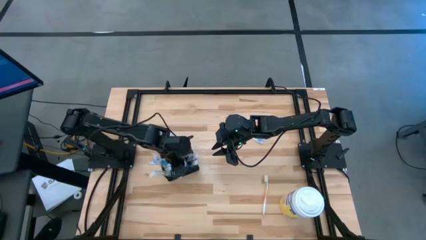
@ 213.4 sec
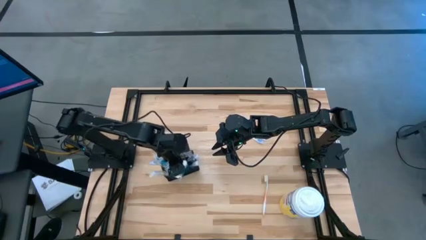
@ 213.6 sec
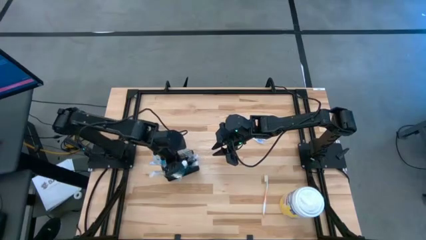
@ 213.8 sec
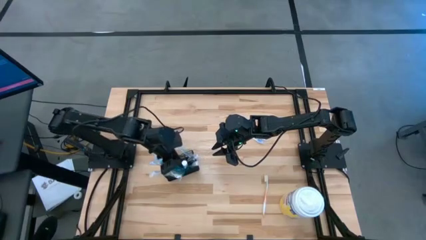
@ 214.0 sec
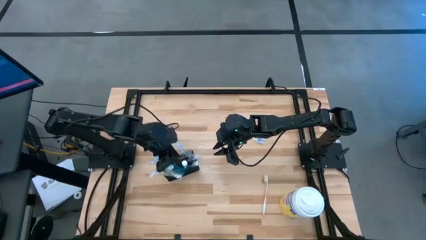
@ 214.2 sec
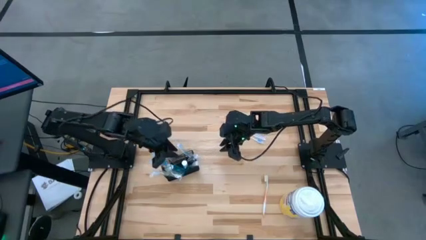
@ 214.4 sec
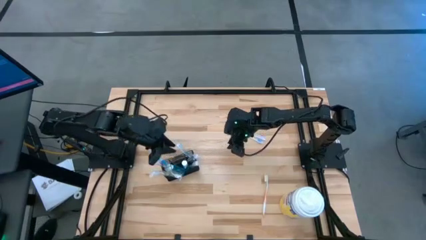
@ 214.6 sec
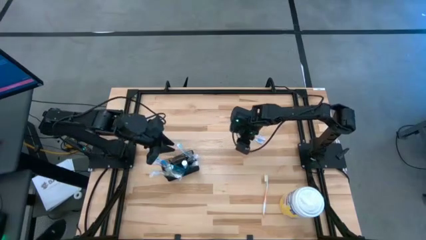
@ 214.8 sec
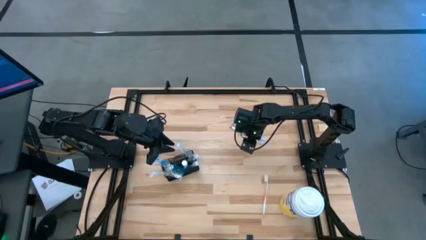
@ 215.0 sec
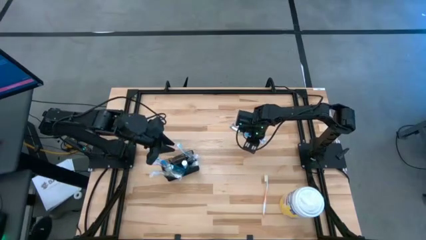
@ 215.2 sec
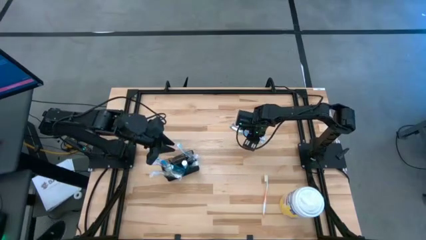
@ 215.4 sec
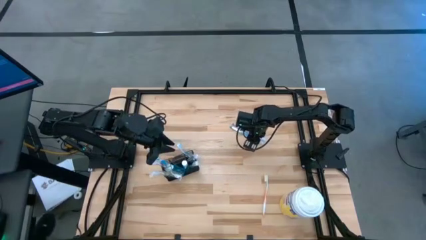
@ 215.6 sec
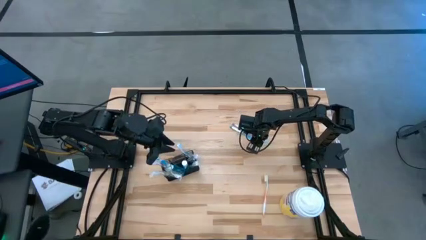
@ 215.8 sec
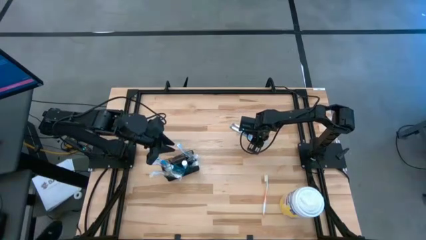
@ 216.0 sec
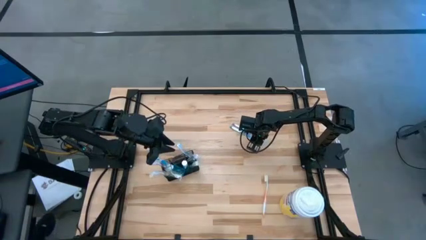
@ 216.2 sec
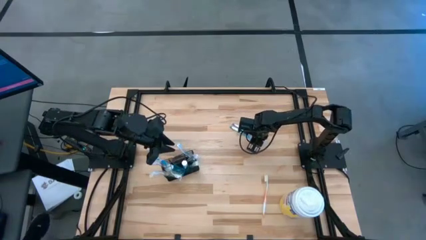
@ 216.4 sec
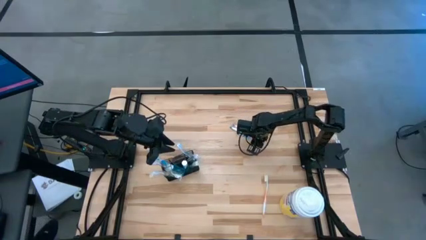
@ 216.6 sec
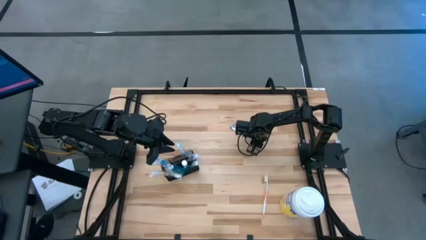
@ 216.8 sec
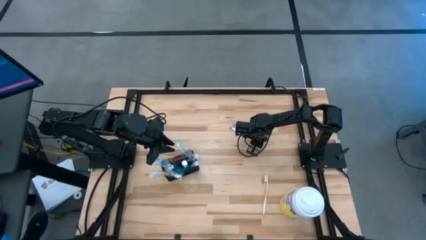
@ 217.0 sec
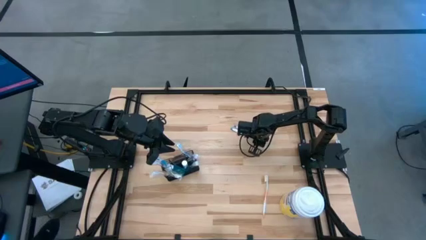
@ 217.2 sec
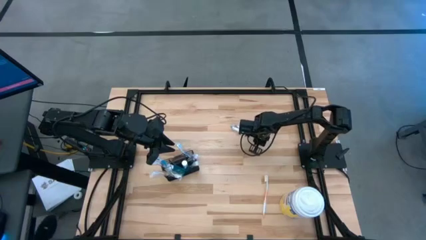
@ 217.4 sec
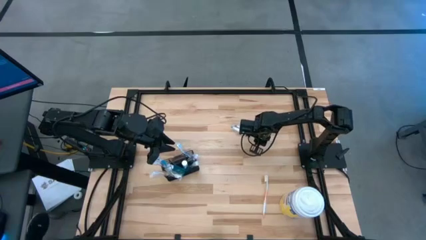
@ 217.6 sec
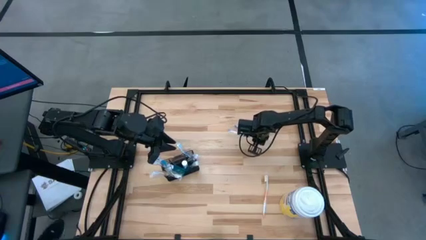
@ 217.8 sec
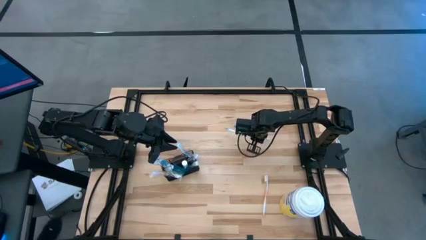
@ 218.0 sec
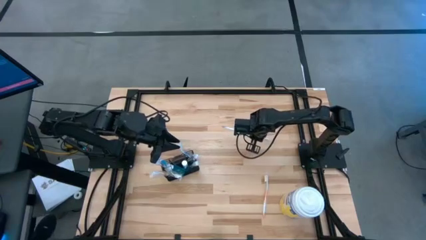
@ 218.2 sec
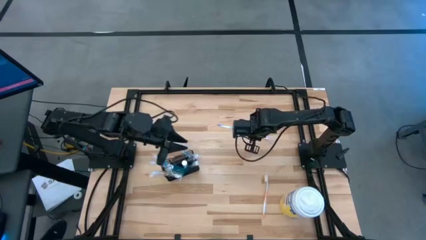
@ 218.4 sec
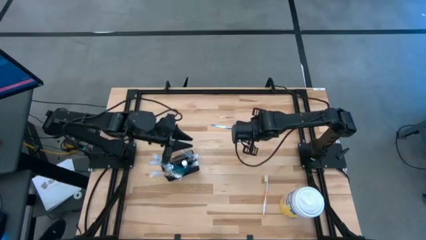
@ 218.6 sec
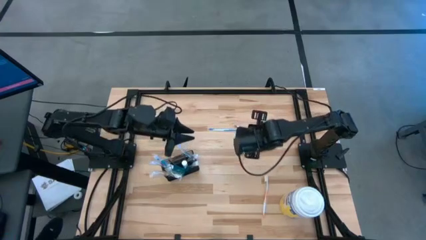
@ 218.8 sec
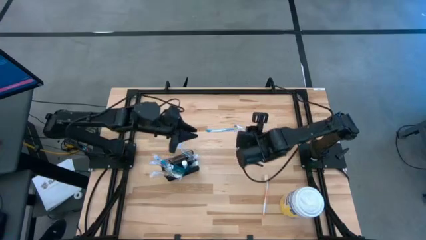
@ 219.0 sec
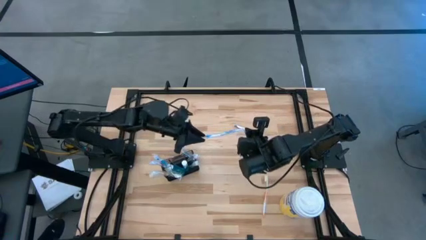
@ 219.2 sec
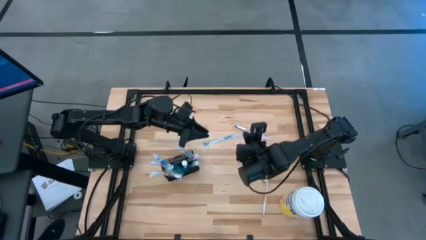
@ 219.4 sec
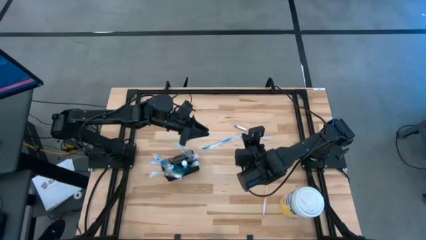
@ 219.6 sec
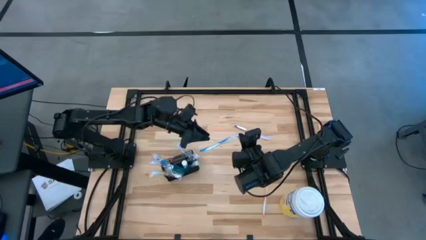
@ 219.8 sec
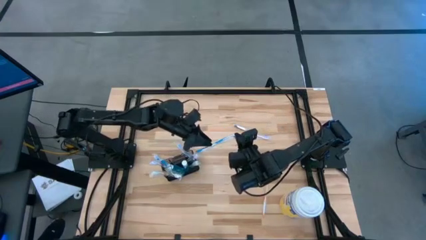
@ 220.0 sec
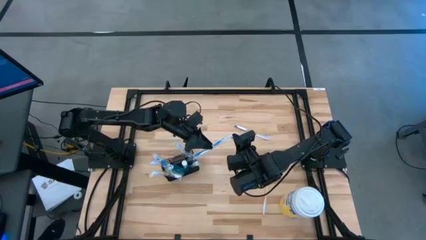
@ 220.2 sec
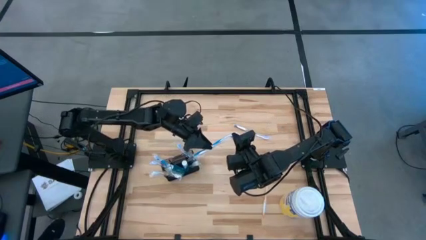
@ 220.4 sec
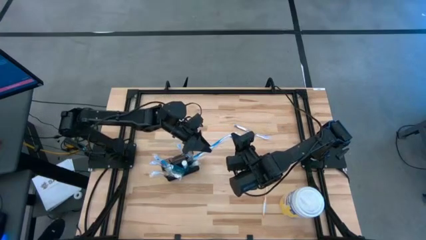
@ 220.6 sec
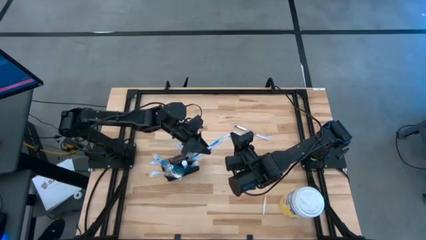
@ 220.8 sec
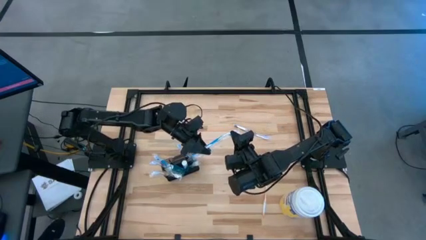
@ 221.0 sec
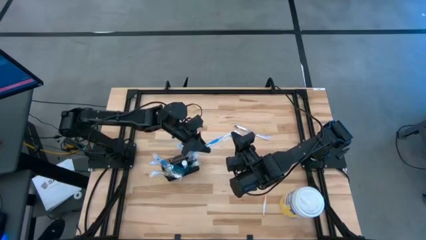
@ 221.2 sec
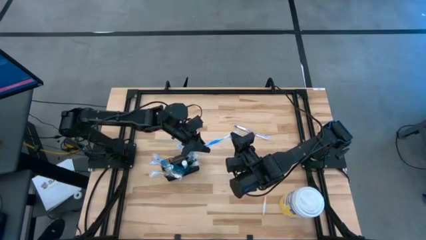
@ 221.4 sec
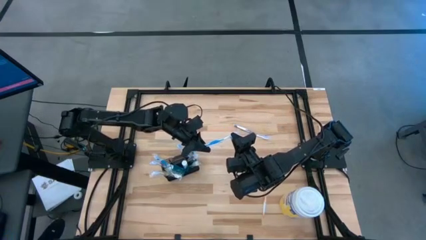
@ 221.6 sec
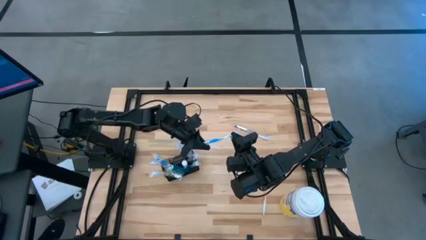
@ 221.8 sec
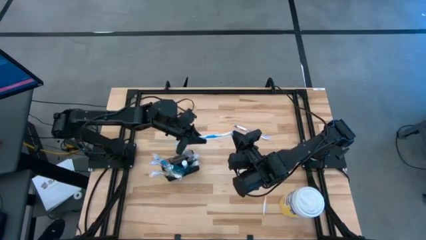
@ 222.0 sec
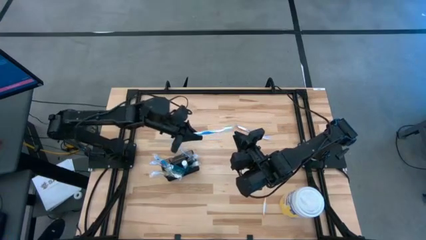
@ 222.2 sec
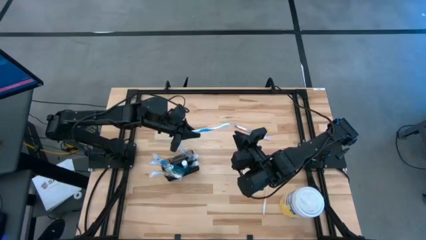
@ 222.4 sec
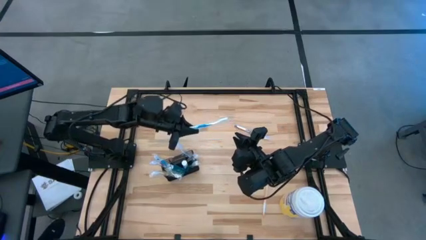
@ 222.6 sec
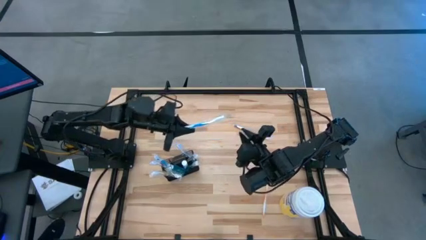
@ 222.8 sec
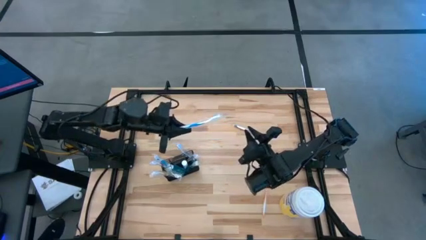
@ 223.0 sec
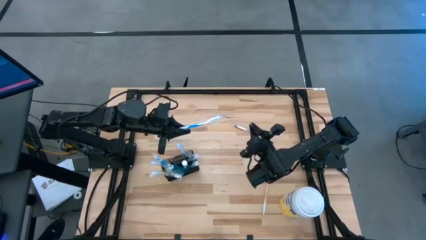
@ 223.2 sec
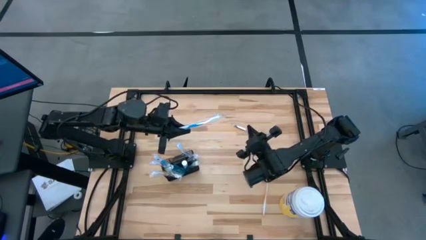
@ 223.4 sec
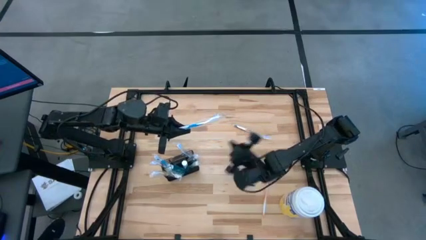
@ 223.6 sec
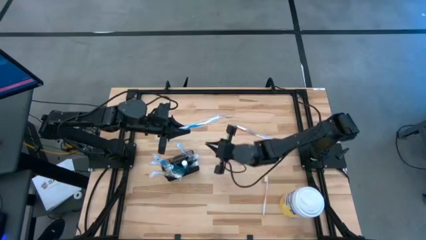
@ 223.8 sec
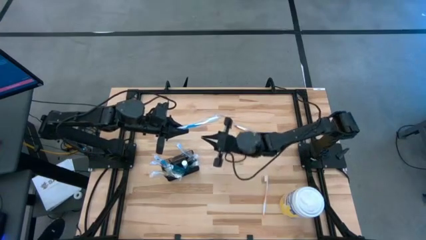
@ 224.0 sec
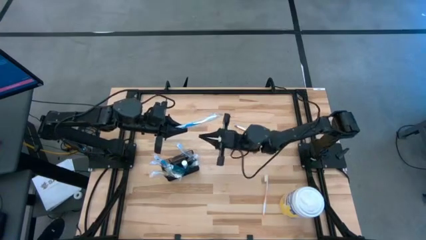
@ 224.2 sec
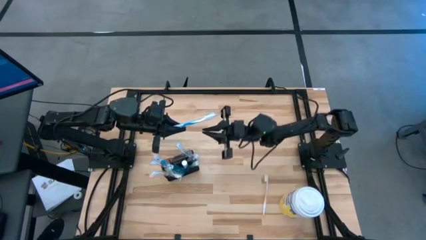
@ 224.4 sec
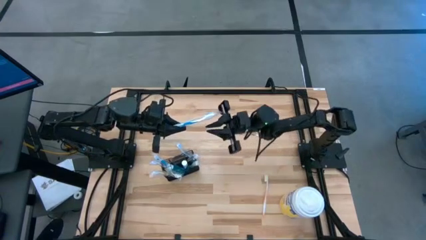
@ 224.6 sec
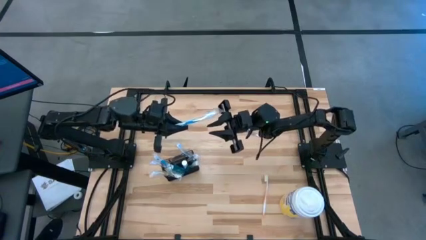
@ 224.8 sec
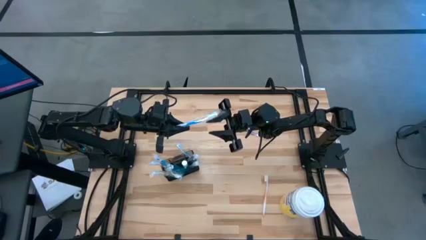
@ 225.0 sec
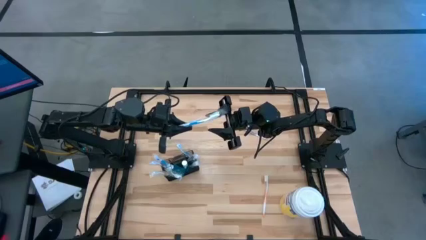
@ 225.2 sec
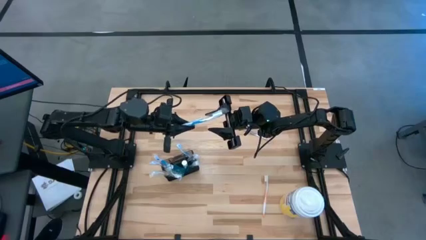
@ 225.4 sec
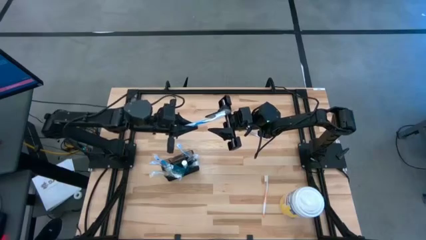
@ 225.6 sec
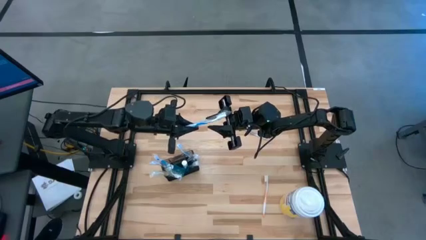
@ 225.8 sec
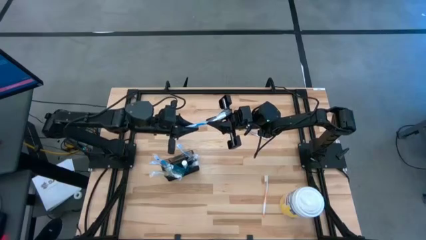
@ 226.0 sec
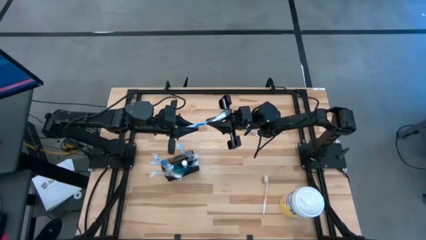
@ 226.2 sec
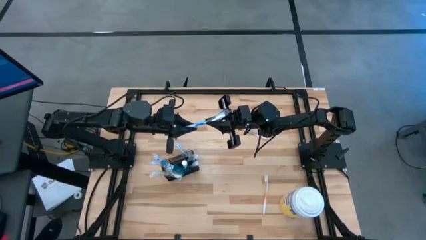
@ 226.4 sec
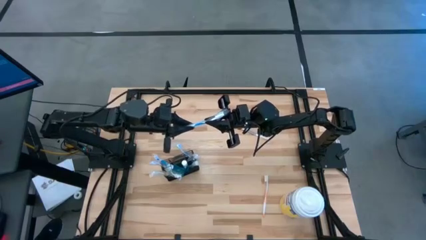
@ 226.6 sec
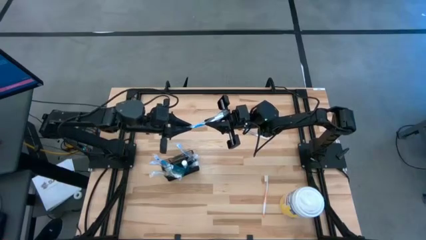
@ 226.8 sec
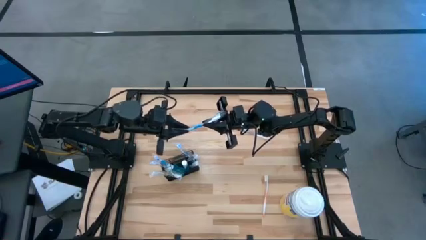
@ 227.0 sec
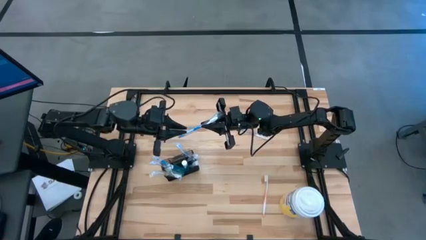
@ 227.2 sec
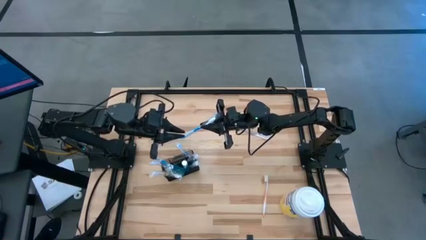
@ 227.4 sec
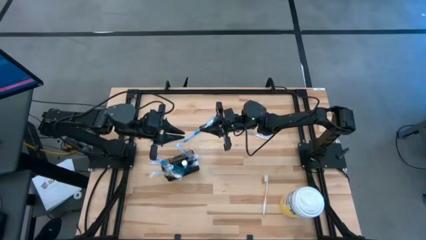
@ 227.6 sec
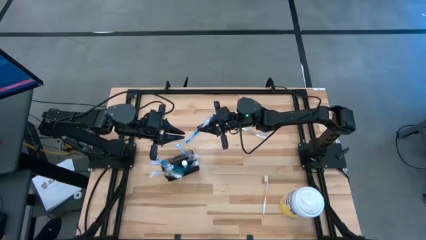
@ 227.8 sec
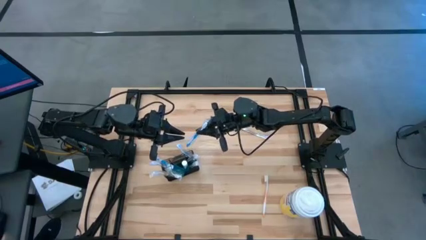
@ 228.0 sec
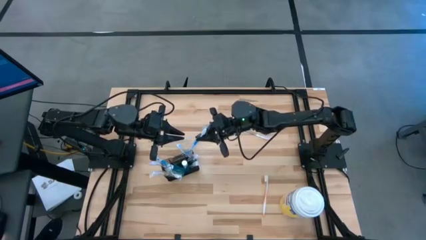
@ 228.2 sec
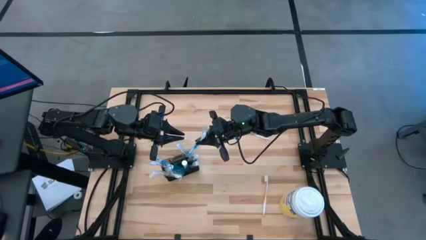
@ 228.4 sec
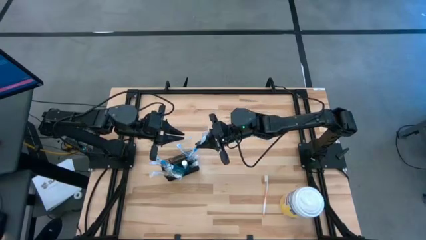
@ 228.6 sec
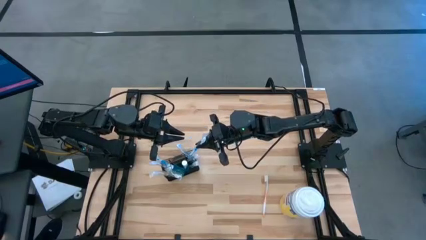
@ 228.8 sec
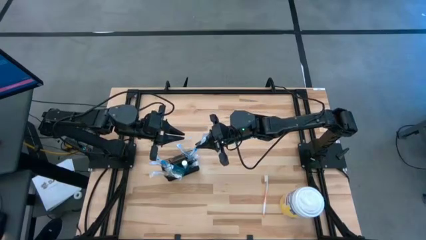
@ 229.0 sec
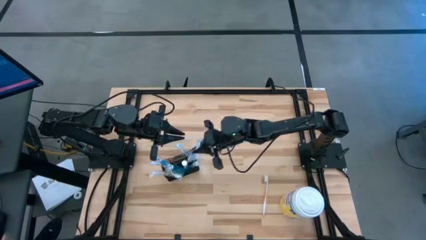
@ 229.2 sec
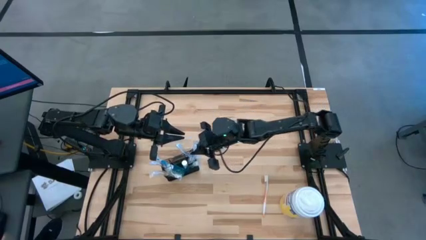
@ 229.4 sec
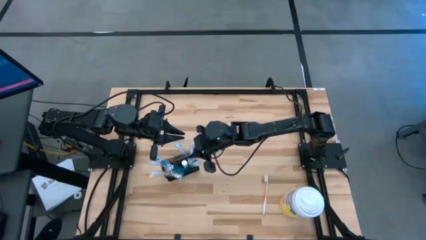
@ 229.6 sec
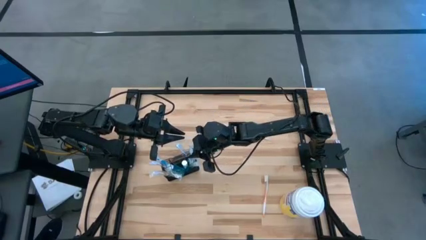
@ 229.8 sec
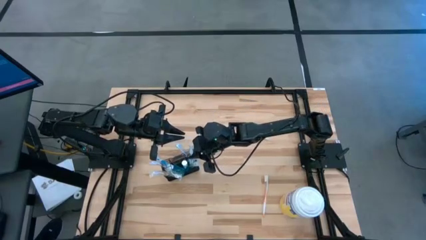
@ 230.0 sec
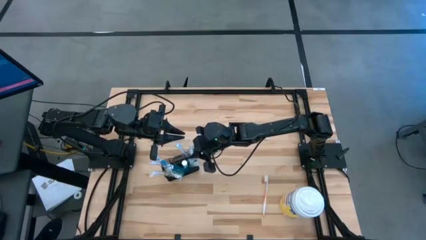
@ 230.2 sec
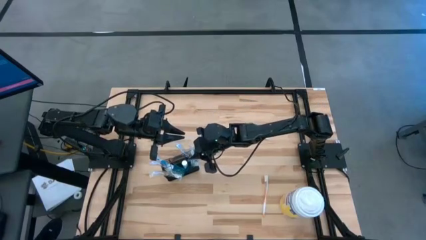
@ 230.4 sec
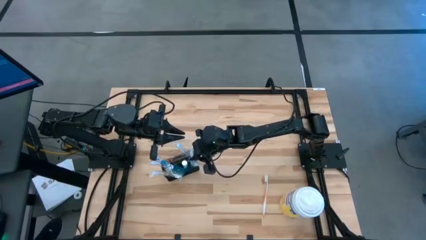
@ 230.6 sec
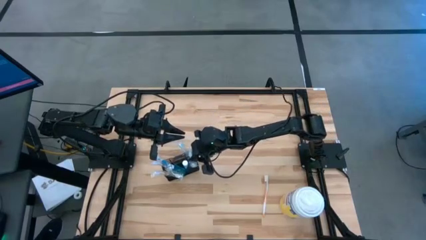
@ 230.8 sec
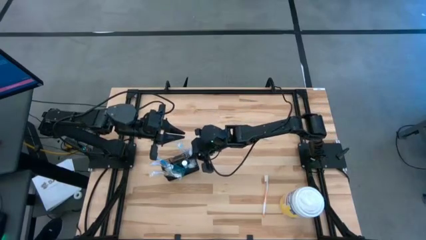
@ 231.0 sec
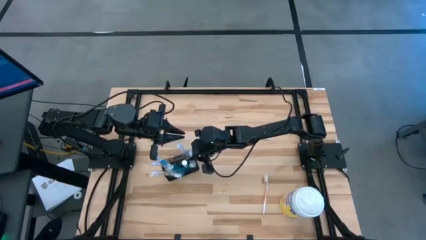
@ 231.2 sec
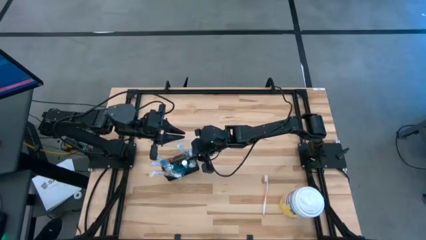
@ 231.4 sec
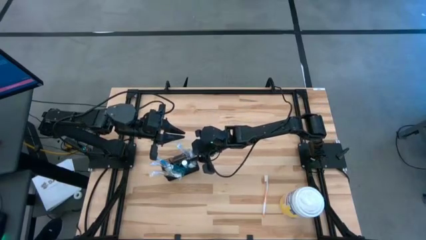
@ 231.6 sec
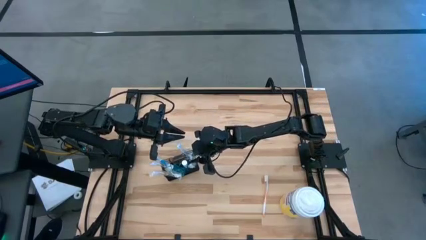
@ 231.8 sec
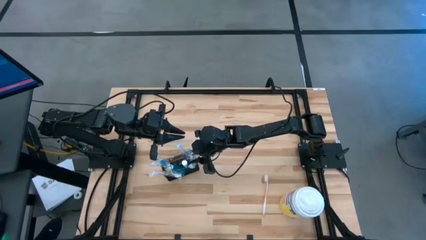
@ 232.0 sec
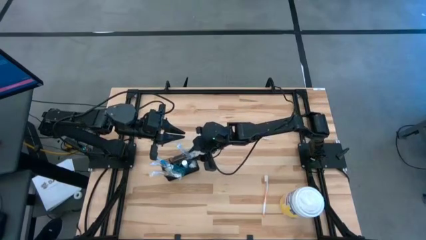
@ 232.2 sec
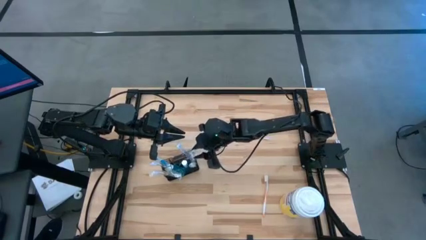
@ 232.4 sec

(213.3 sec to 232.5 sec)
Task: Pick & Place toothbrushing station
Put the blue toothbrush into the bottom right section of the mesh organizer
